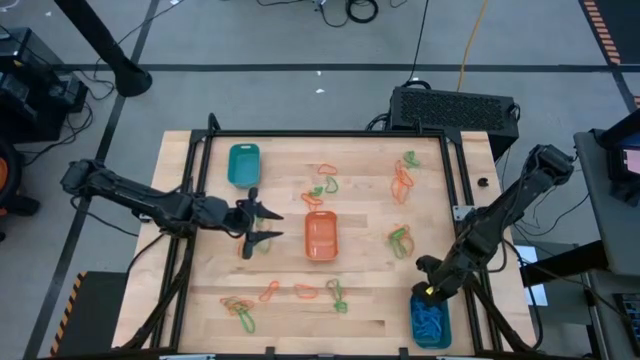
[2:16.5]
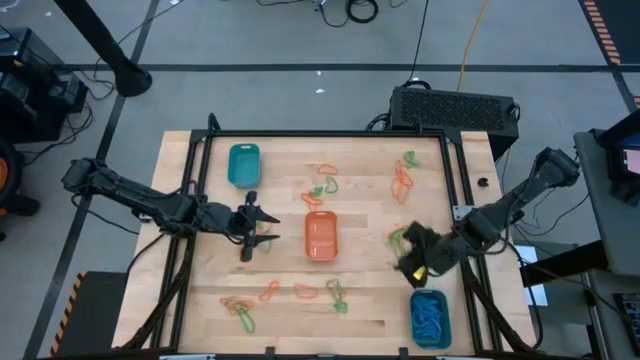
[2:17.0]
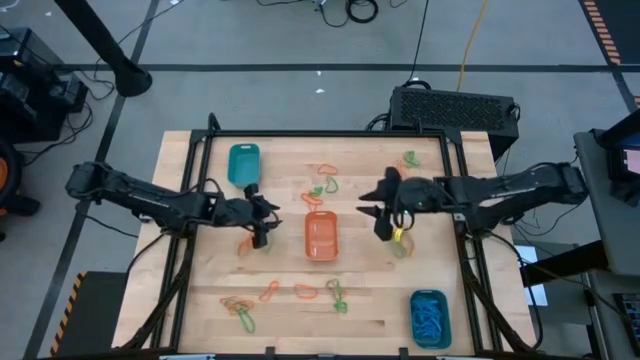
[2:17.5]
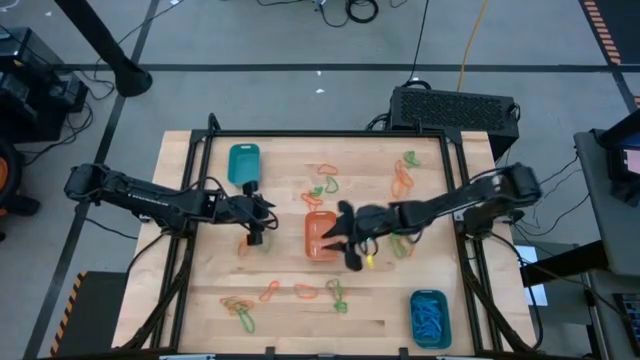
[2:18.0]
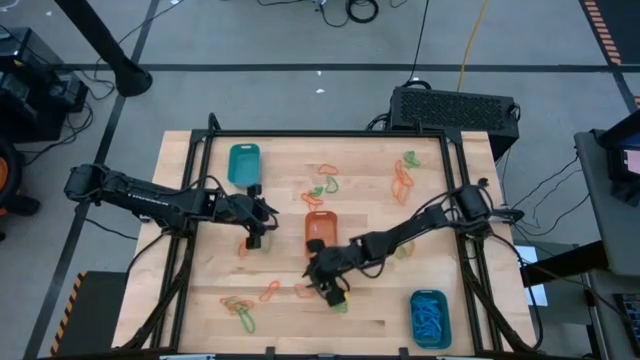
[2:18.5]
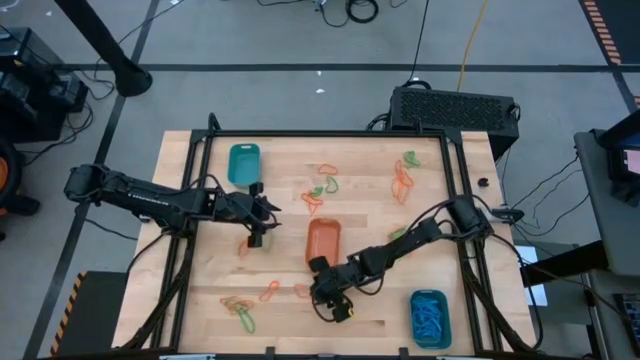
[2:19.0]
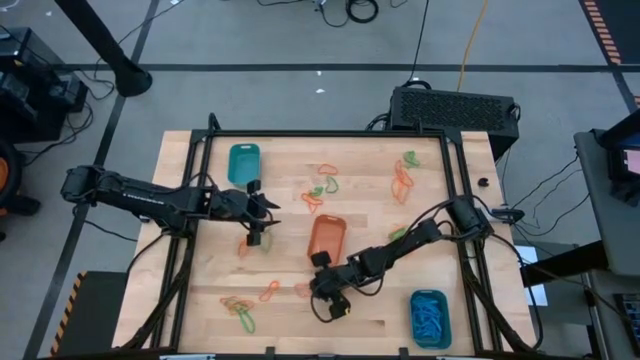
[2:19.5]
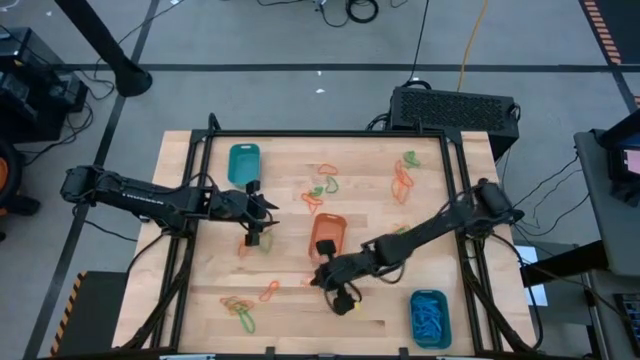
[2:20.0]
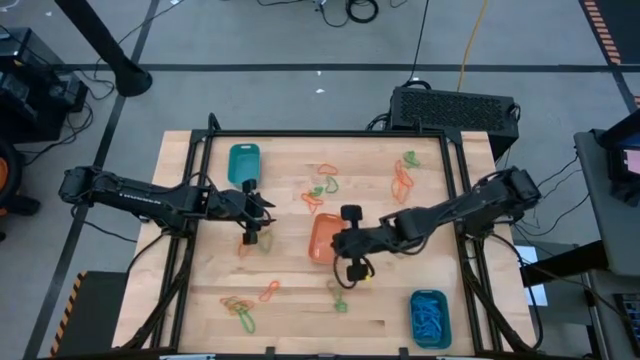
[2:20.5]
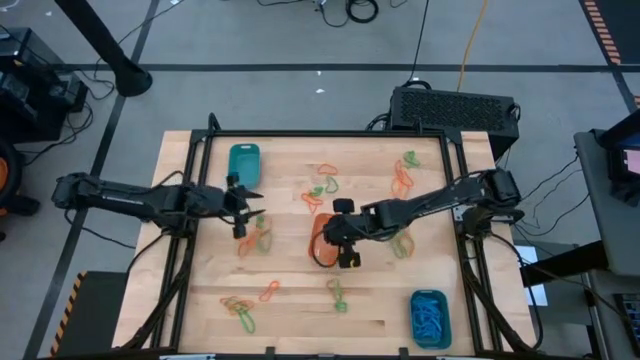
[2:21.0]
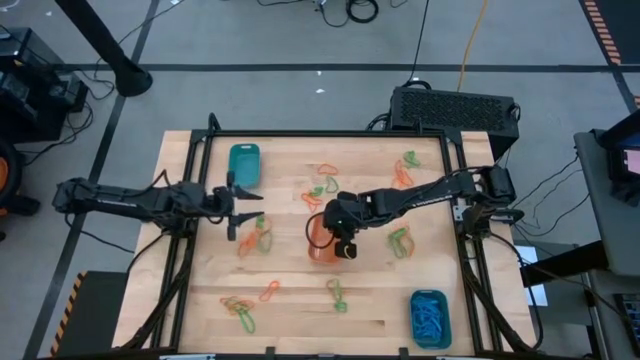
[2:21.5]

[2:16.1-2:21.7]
Task: Sort rubber bands into baskets
Put the orange rubber band into the orange bin

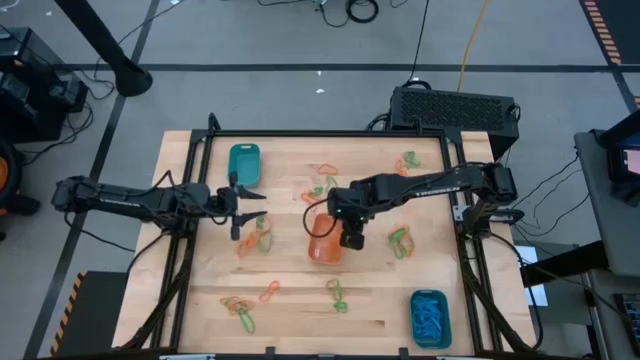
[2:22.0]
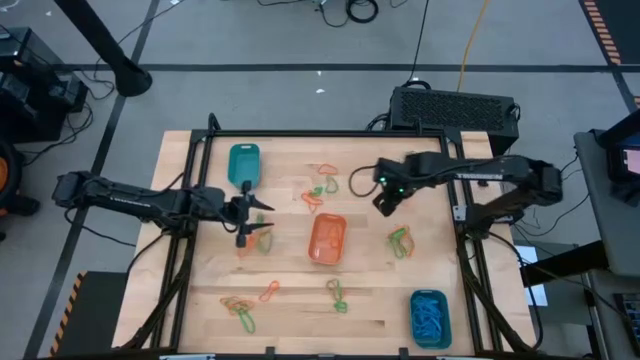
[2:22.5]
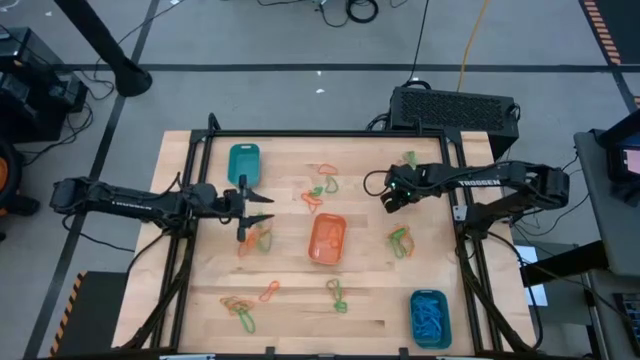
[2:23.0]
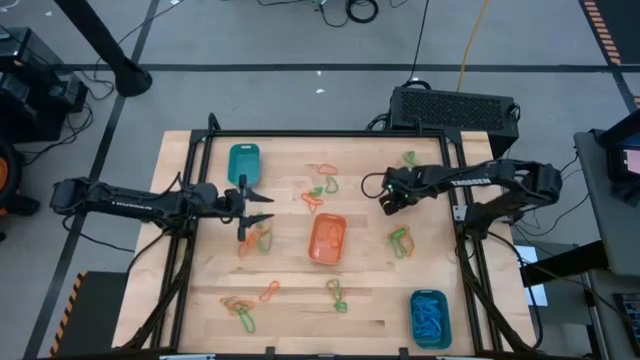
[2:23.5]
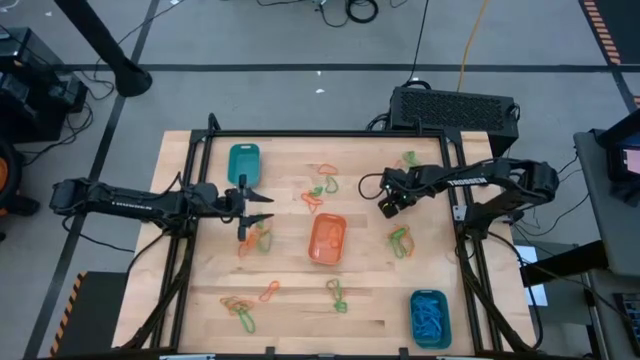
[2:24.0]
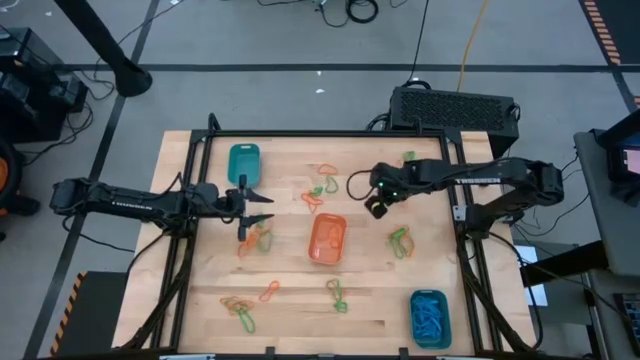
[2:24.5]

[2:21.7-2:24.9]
Put the orange rubber band into the orange bin

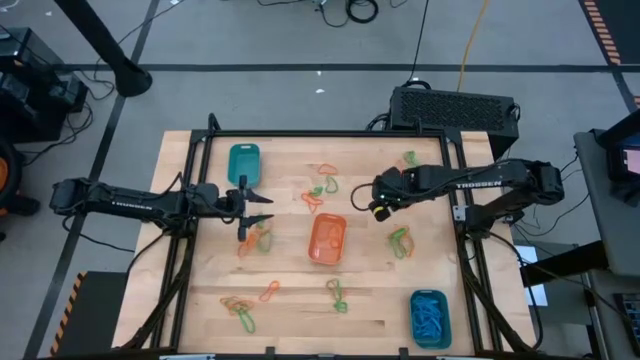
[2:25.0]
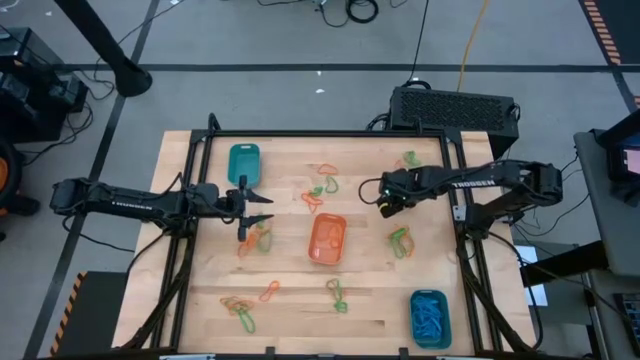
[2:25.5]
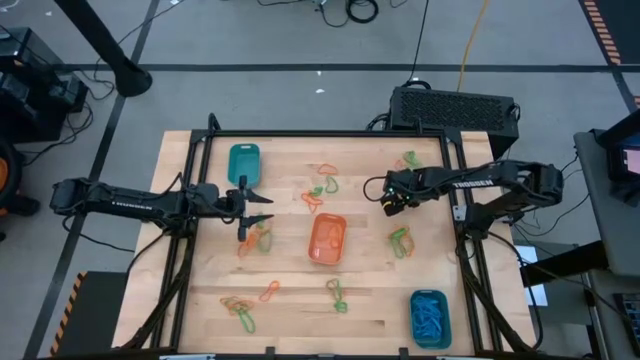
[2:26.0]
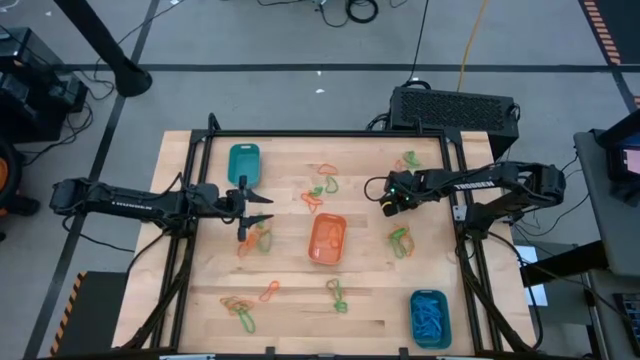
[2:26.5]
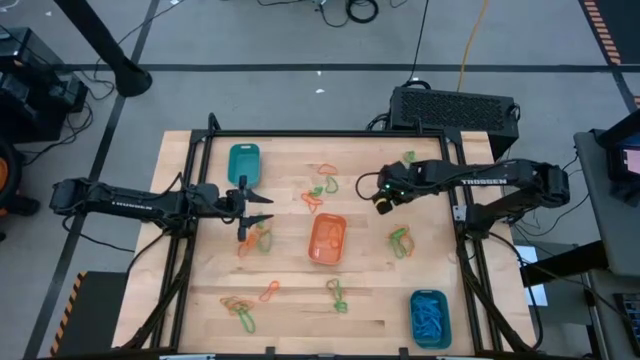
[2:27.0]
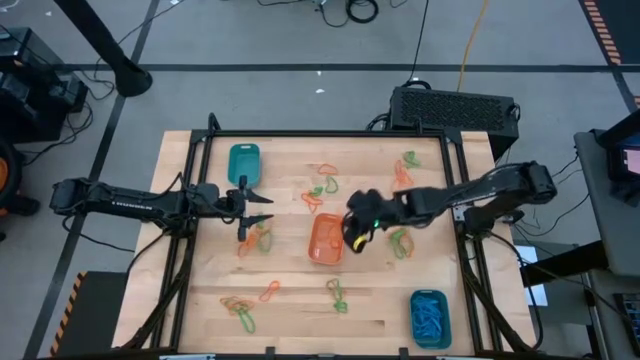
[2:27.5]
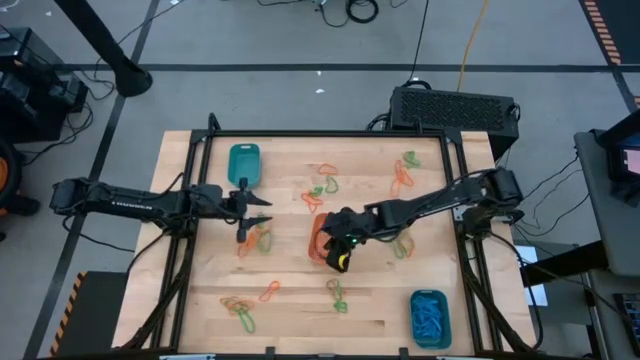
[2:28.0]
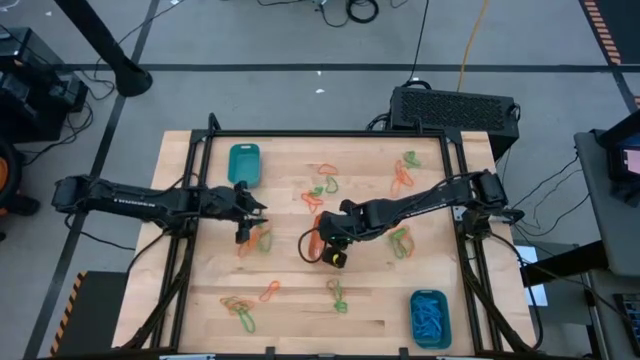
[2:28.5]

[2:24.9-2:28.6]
Put the orange rubber band into the orange bin

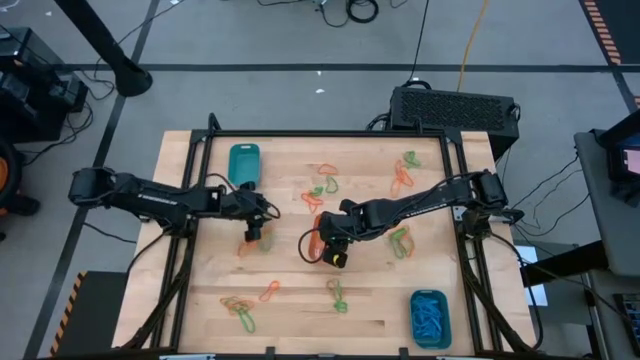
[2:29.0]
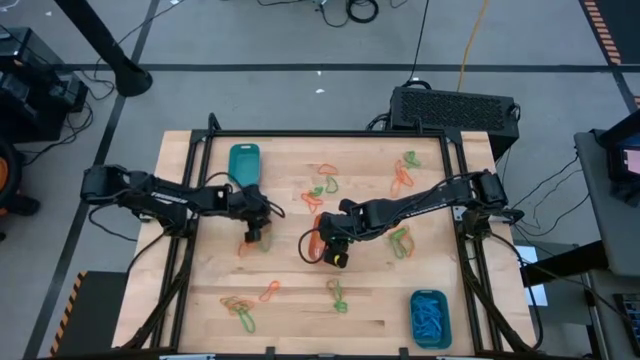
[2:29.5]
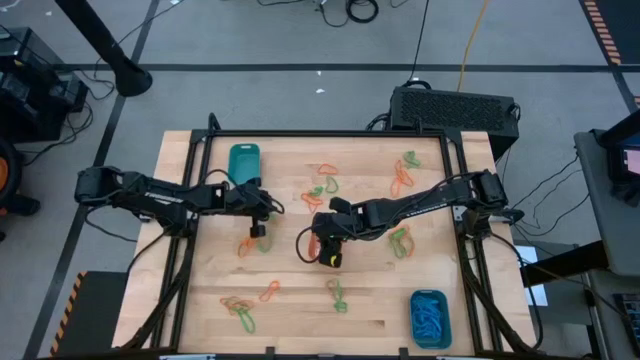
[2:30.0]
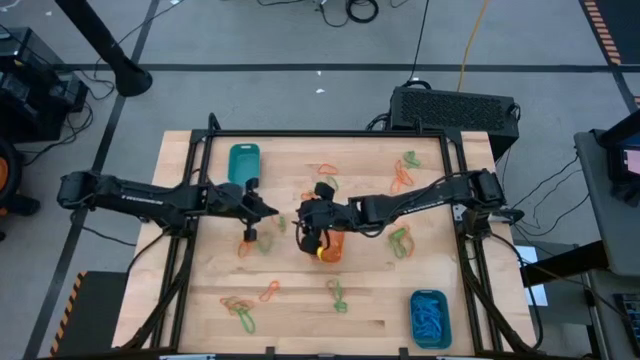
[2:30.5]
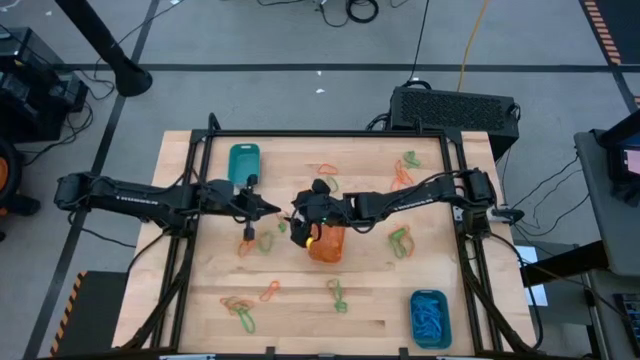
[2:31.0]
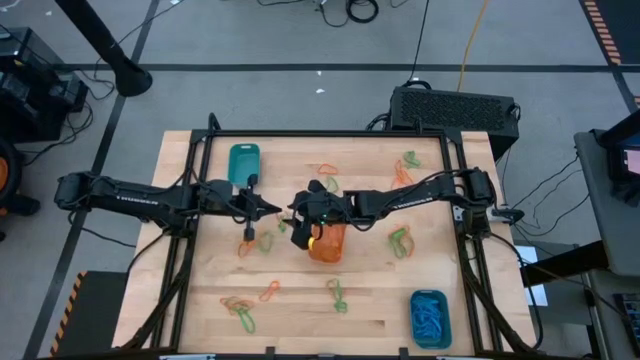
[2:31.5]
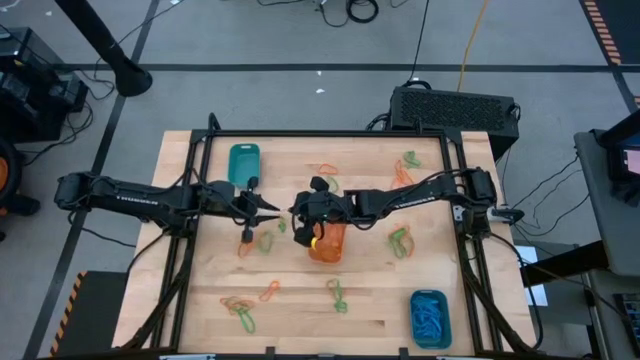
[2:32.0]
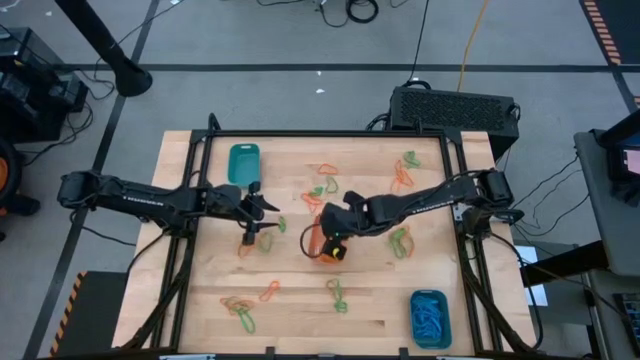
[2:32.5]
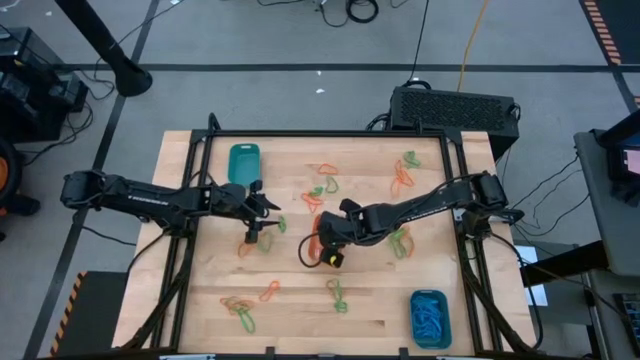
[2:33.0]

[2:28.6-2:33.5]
Put the orange rubber band into the orange bin

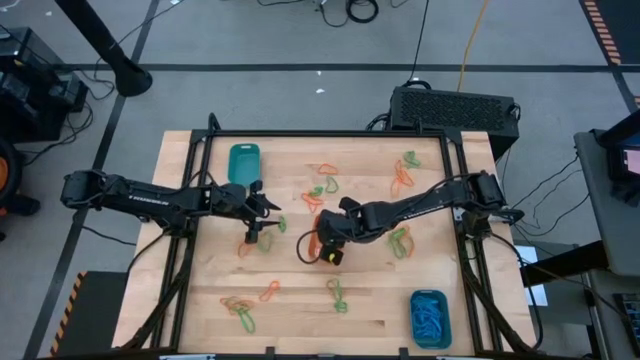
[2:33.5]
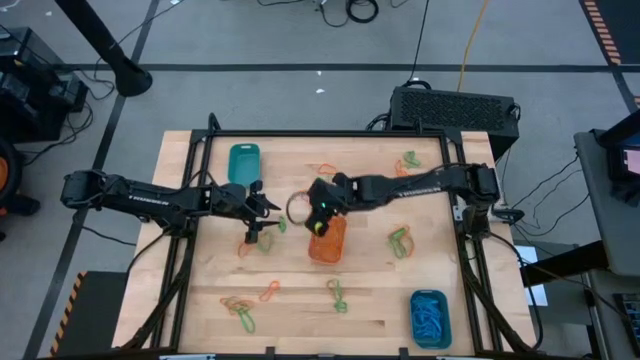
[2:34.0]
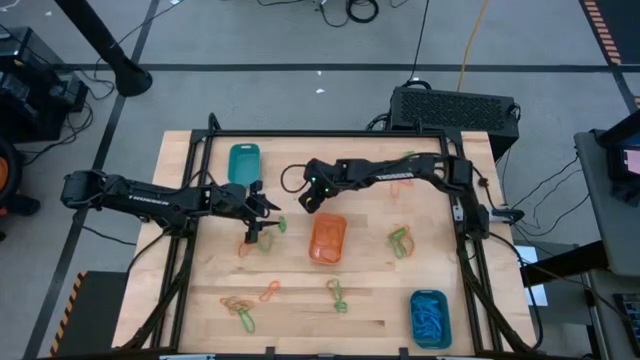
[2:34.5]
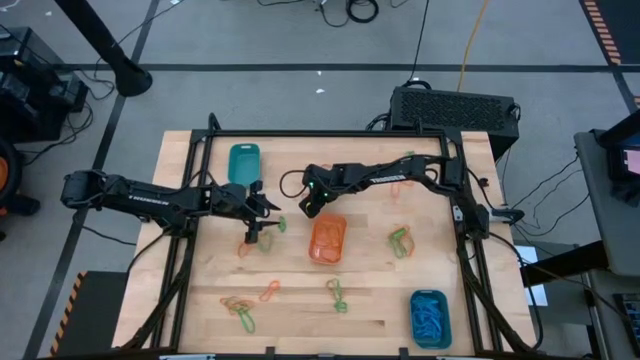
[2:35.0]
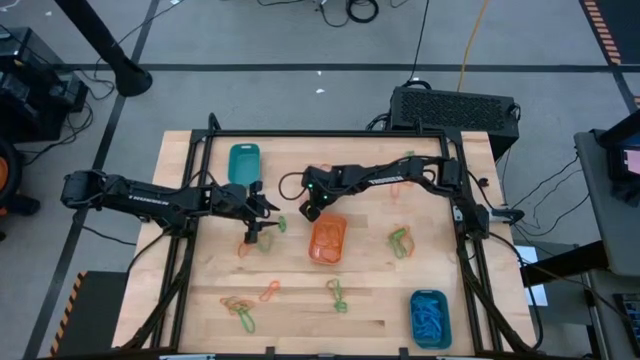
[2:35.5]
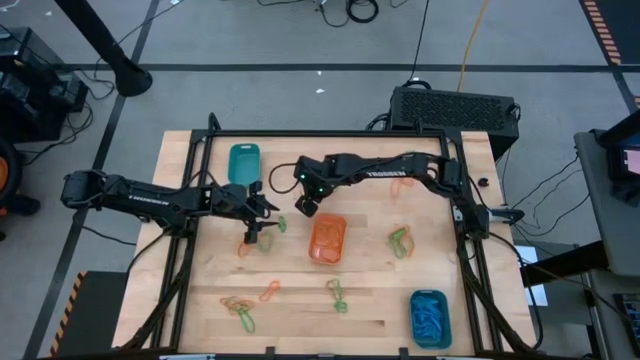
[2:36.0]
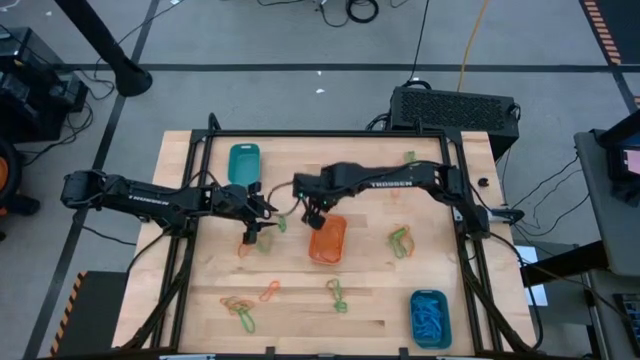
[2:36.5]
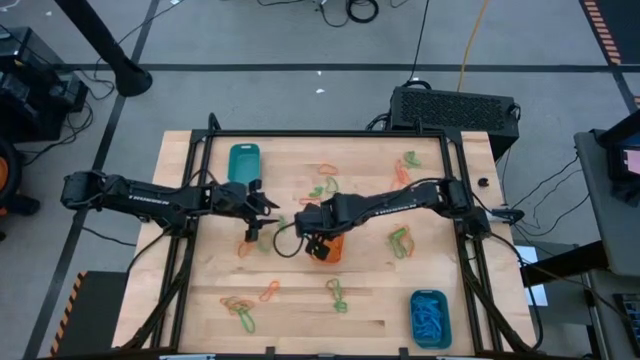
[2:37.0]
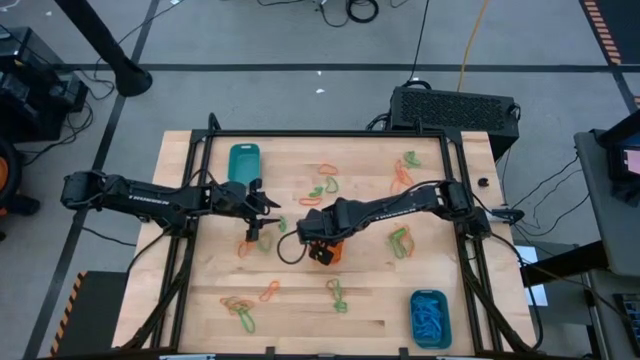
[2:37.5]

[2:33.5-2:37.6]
Put the orange rubber band into the orange bin
